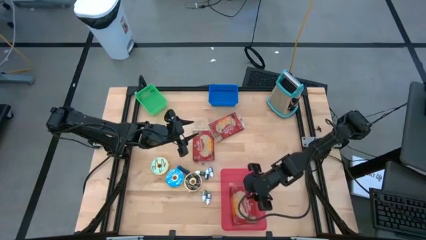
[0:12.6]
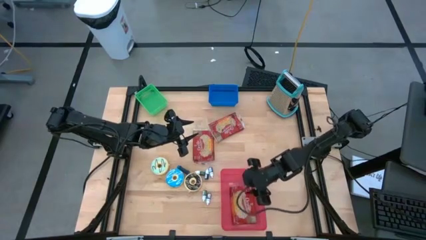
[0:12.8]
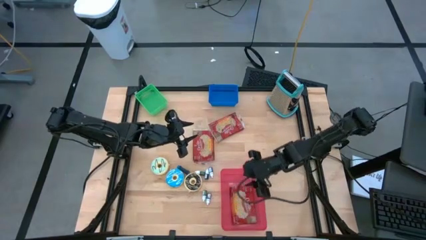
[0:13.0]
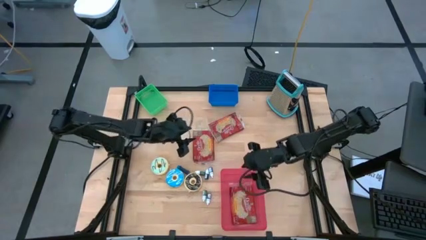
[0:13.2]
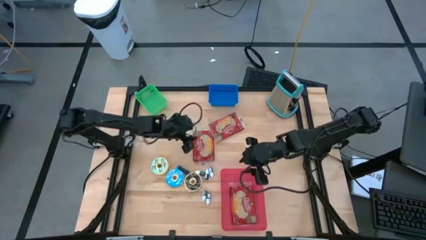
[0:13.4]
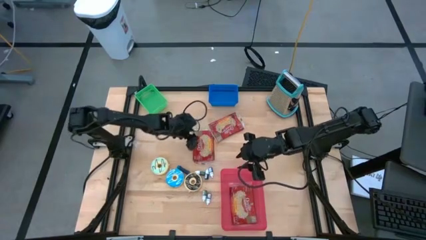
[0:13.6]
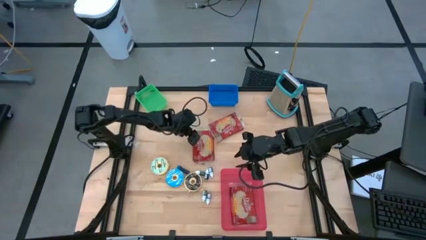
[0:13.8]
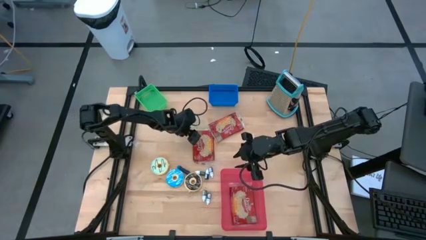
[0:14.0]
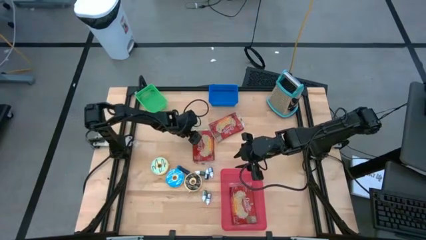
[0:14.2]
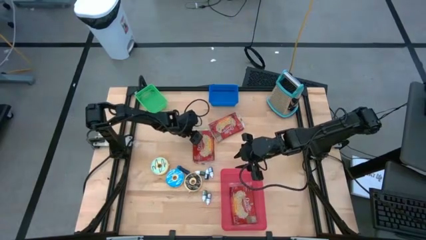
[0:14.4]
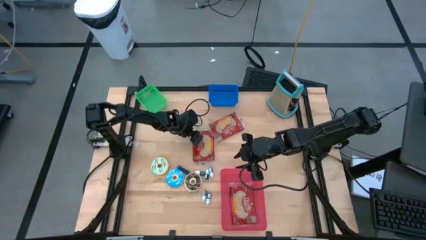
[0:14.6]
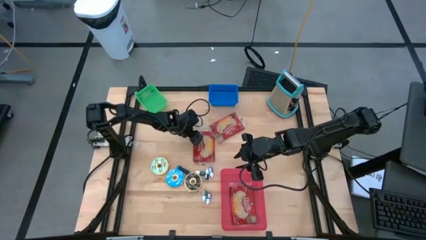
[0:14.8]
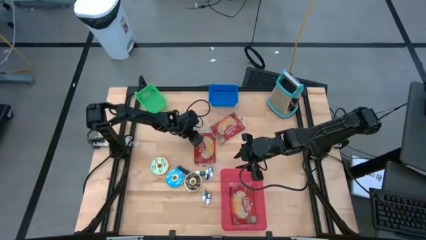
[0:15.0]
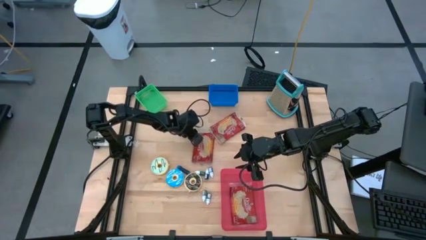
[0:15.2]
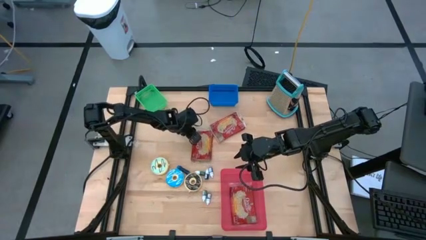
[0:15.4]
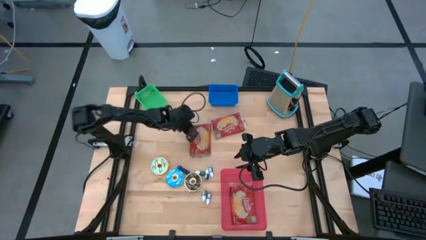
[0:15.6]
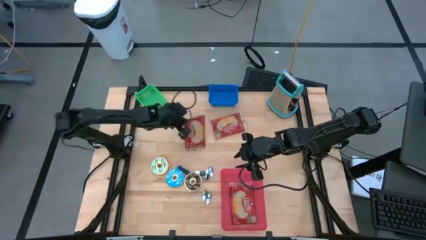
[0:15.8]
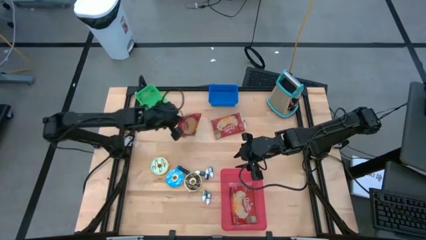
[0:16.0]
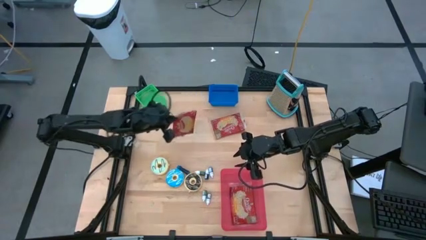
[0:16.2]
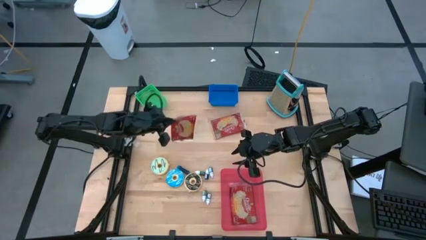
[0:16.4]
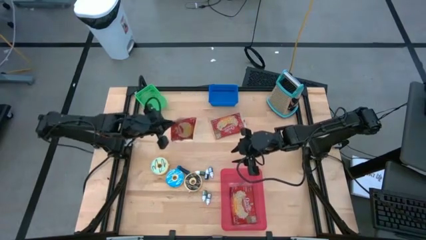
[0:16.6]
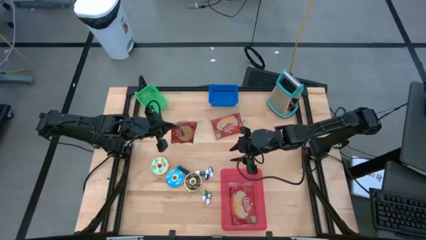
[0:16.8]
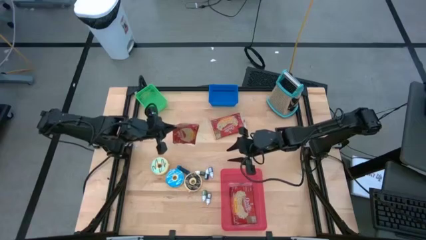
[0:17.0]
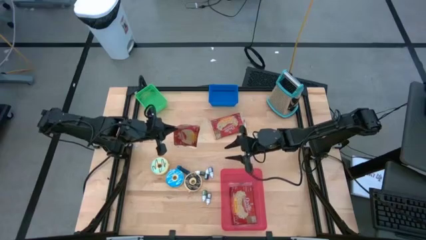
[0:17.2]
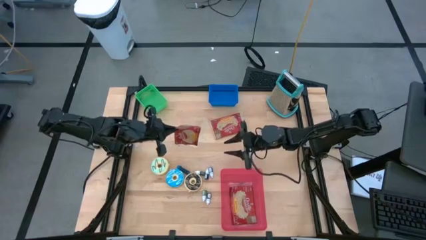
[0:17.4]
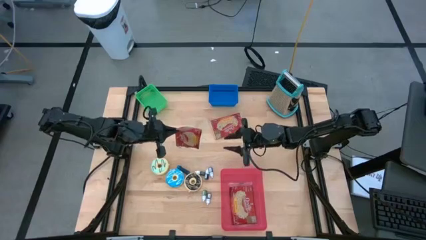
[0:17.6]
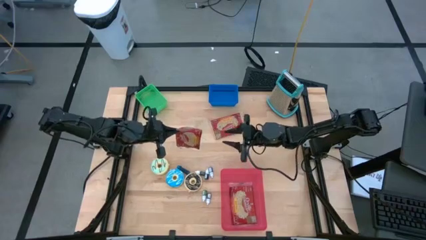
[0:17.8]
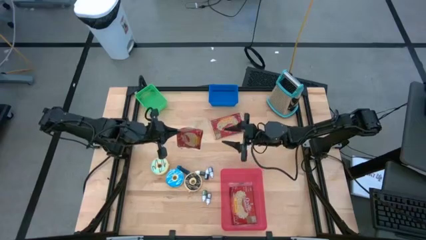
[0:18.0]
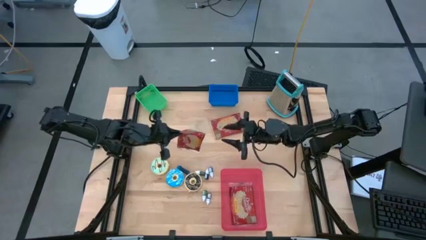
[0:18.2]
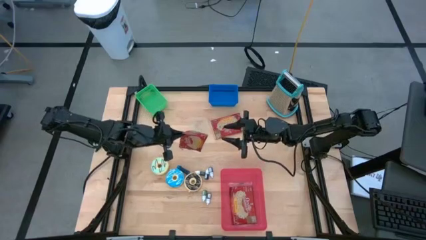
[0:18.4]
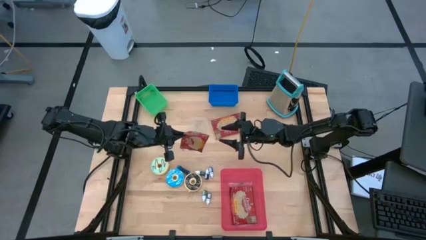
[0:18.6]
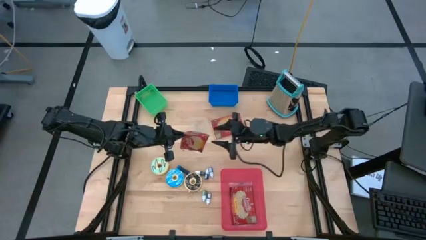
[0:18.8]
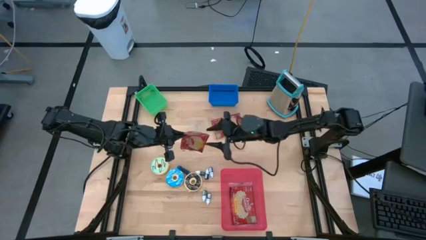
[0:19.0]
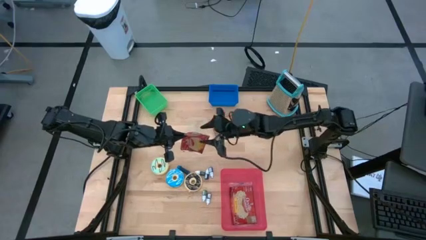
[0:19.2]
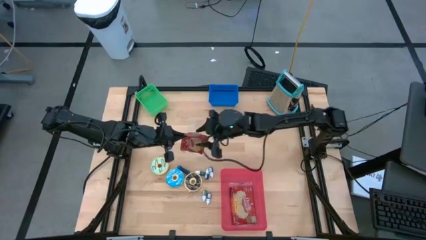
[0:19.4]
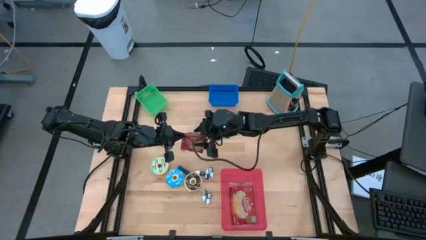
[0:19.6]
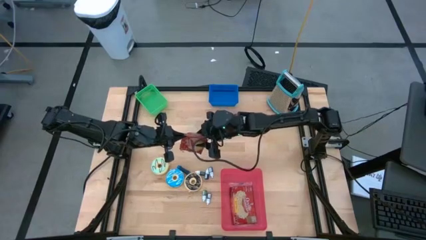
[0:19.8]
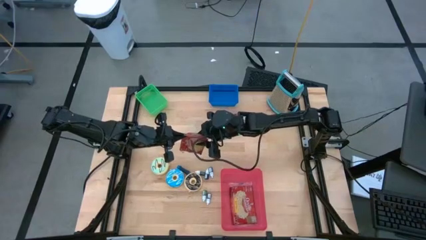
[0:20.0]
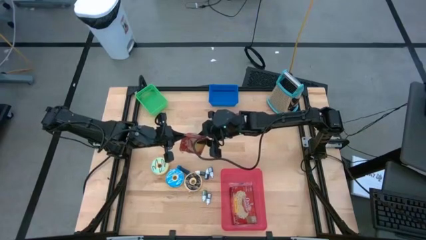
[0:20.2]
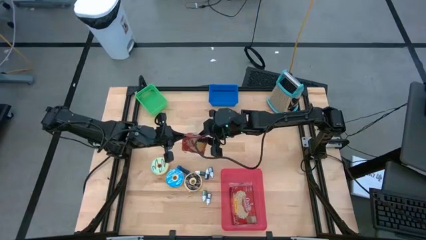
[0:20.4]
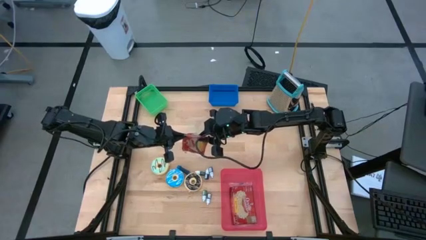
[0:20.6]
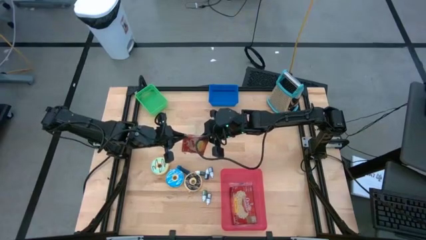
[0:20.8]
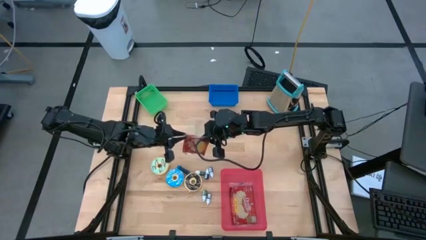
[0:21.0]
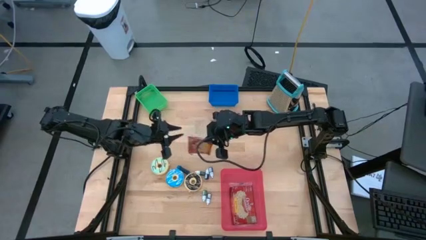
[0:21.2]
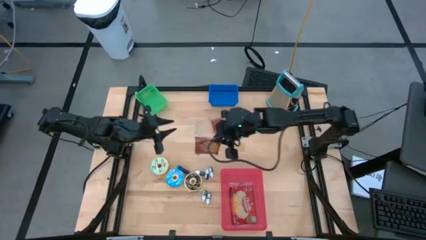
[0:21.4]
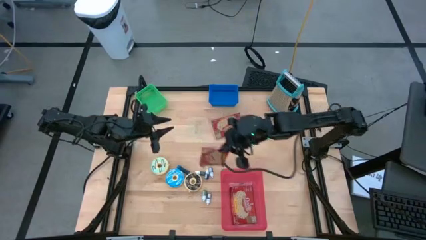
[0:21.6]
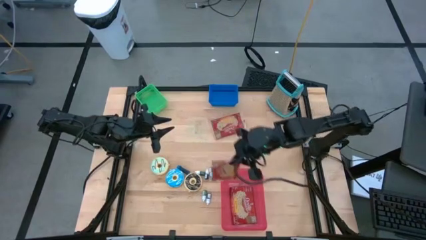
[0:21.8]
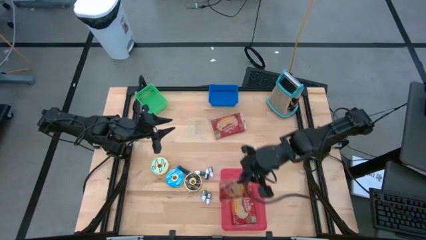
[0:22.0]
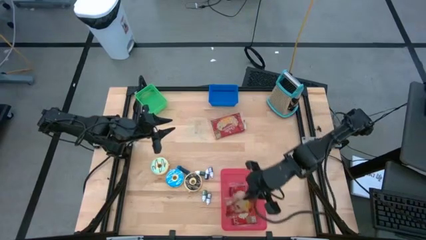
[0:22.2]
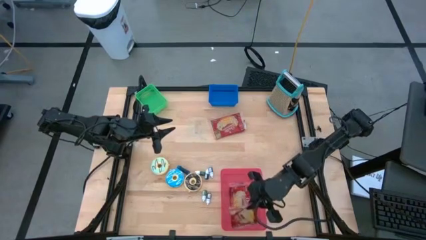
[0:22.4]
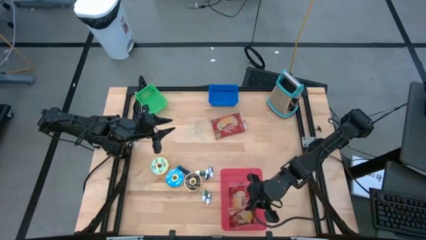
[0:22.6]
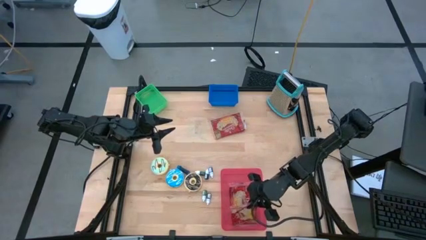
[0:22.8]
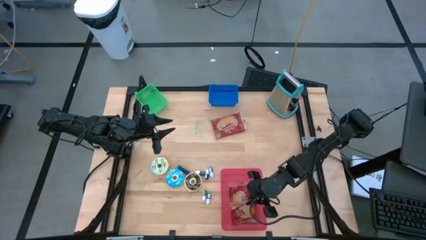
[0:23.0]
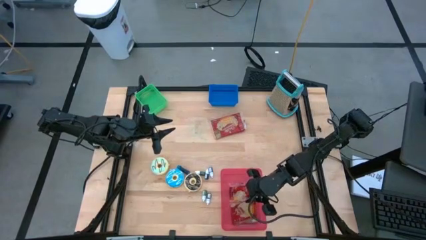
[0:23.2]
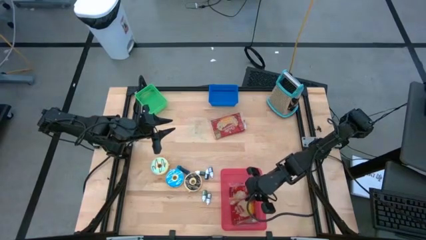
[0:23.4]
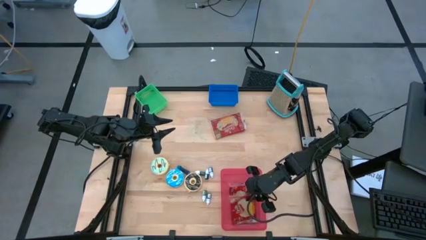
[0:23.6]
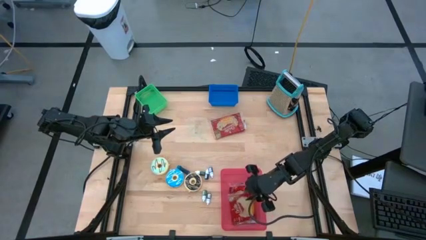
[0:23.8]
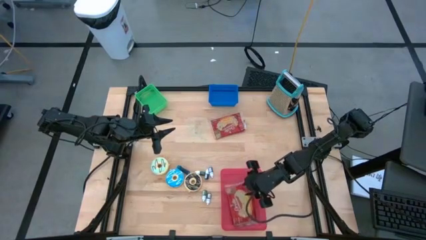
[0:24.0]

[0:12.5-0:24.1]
Stack the bottom red popcorn bag on top of the red popcorn bag in the red bin
